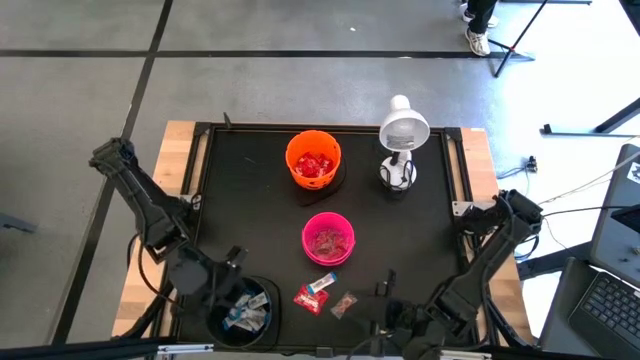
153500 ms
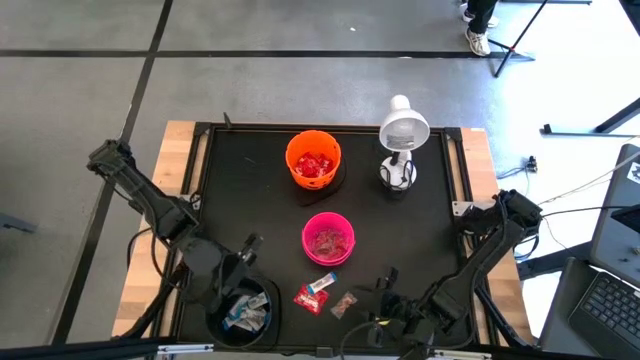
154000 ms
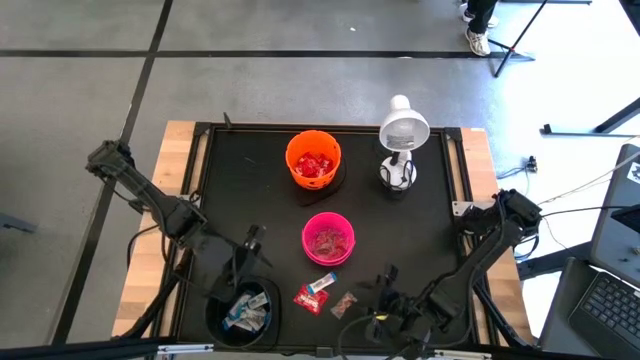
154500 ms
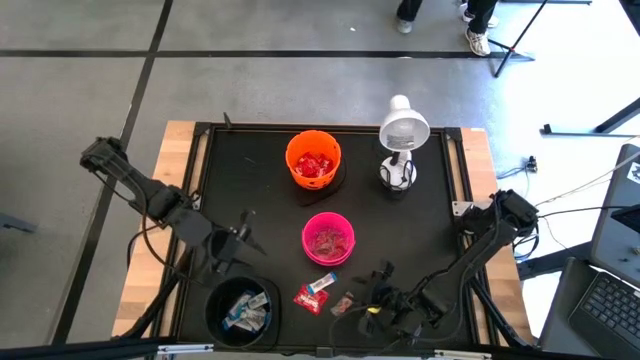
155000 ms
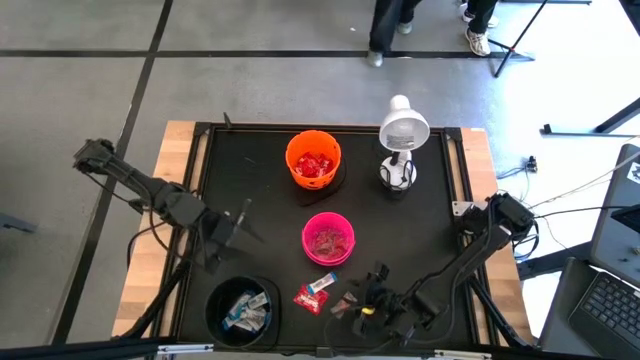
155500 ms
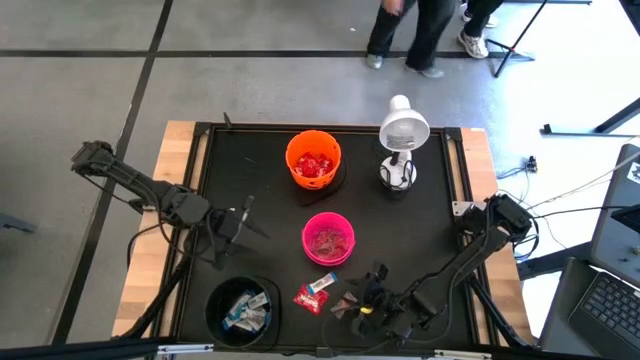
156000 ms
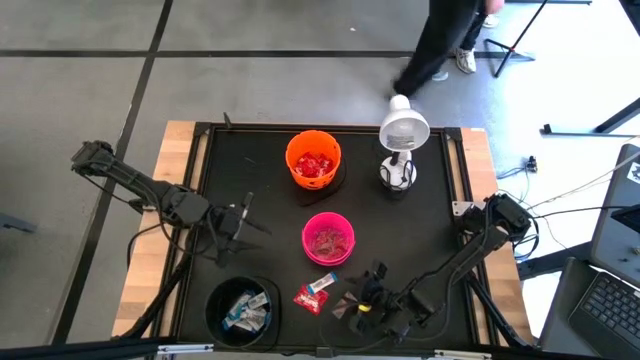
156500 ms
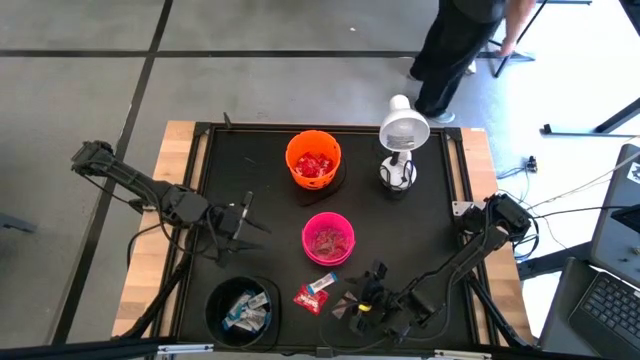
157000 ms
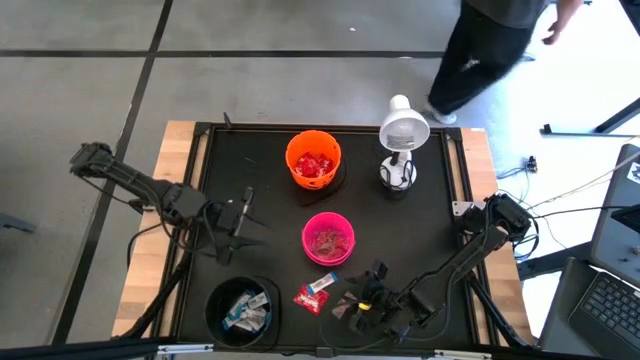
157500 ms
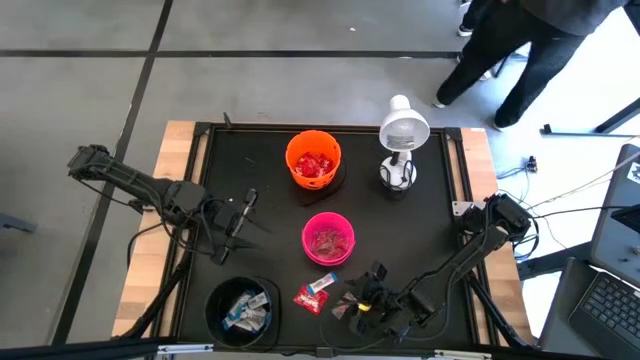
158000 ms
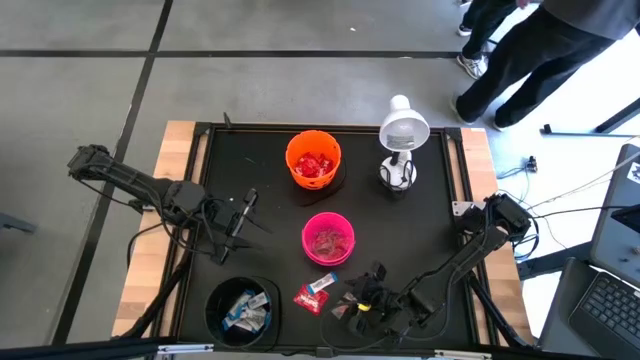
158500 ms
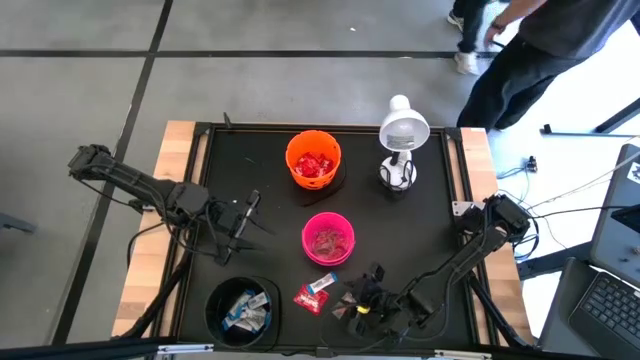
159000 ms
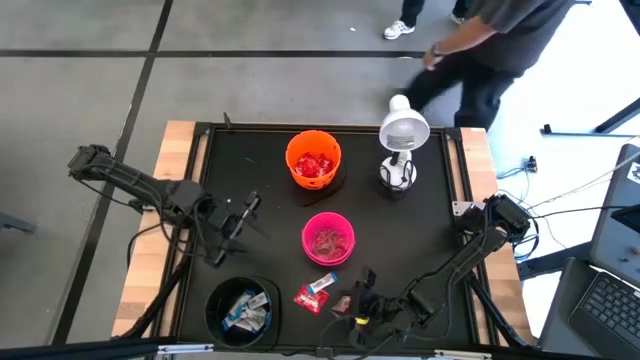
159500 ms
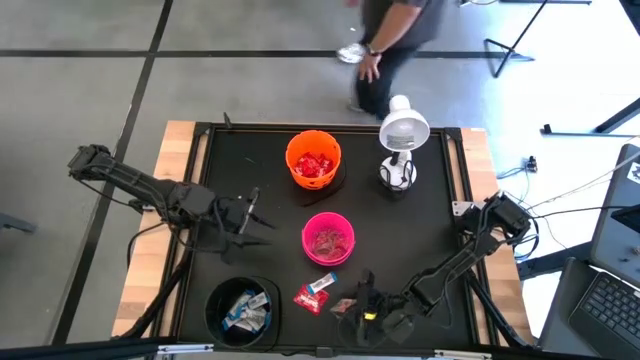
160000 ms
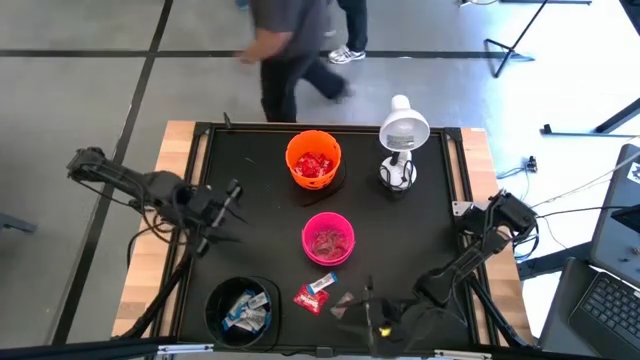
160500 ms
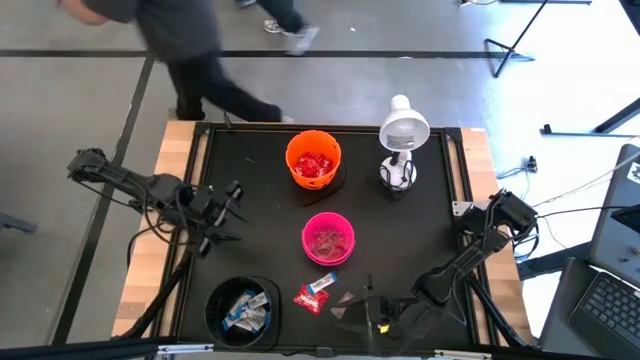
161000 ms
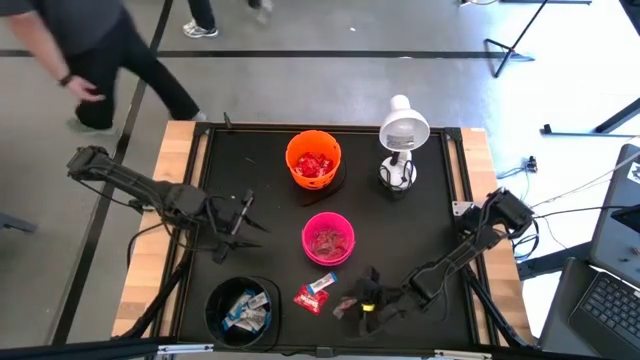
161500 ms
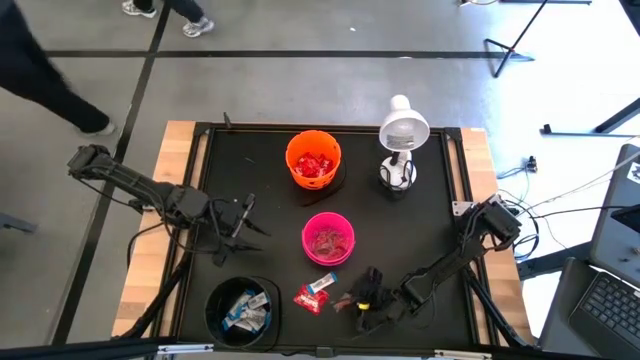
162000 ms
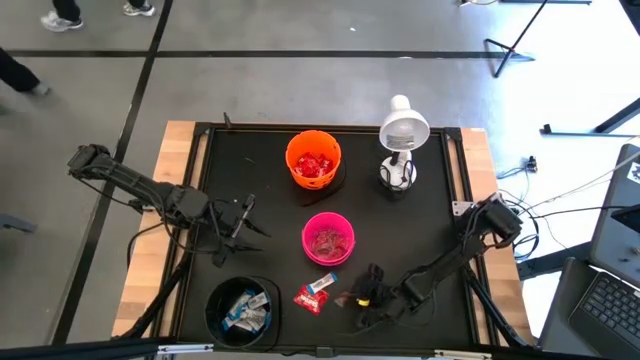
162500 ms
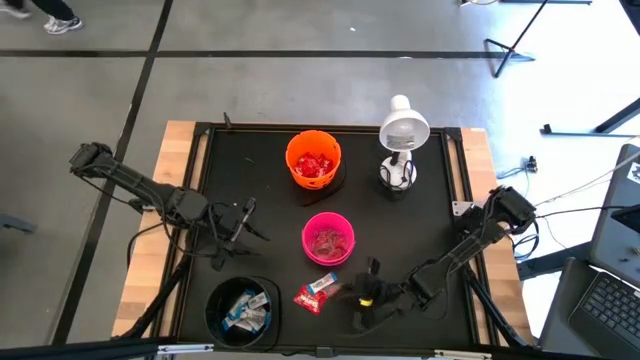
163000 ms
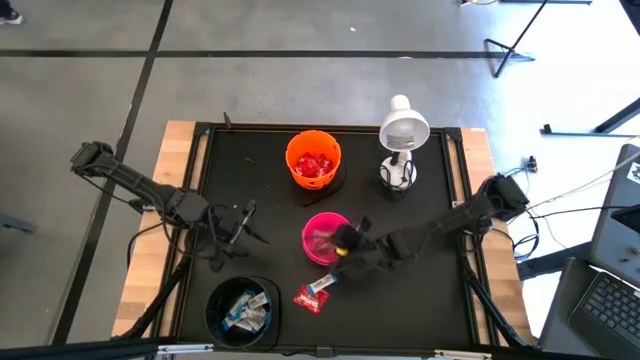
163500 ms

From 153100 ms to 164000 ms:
Task: Sort candy
Put the orange gummy into the pink bucket

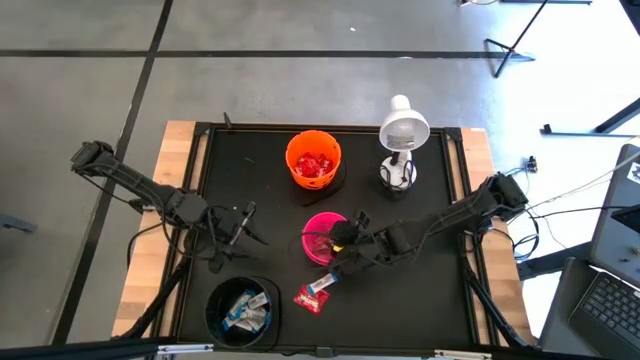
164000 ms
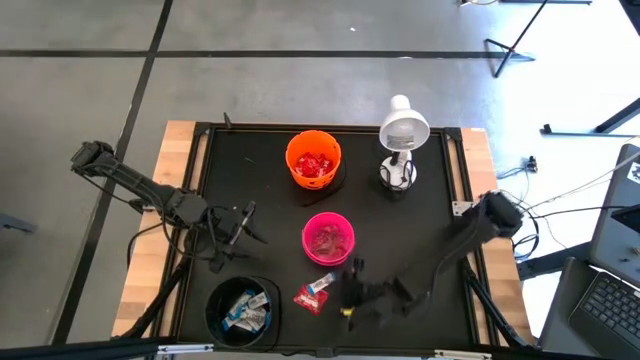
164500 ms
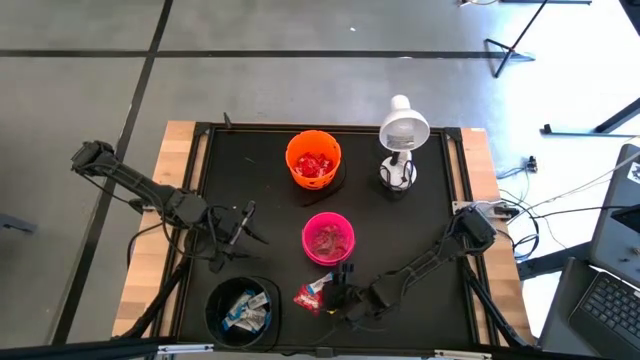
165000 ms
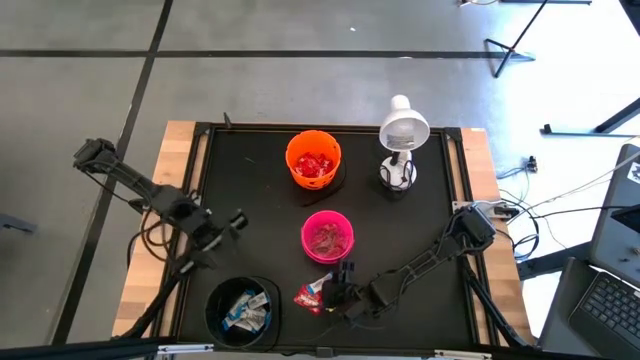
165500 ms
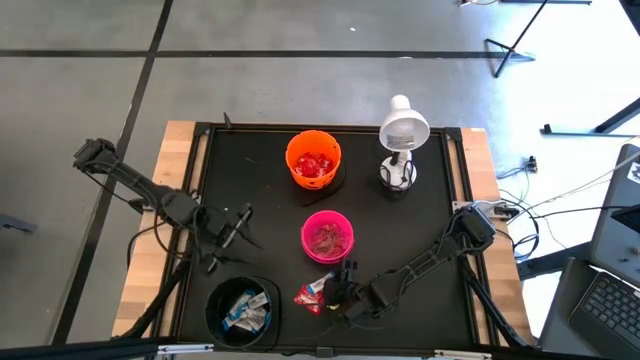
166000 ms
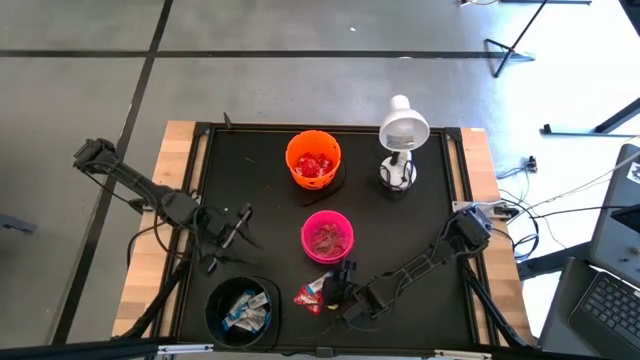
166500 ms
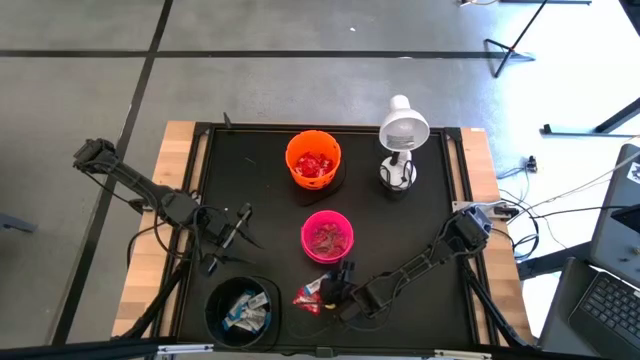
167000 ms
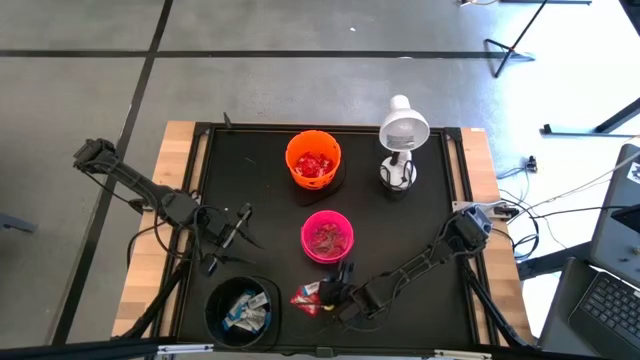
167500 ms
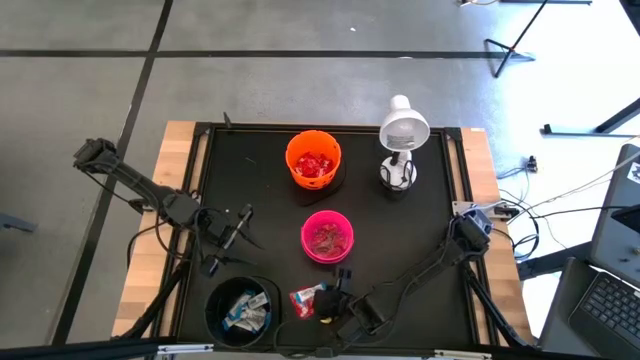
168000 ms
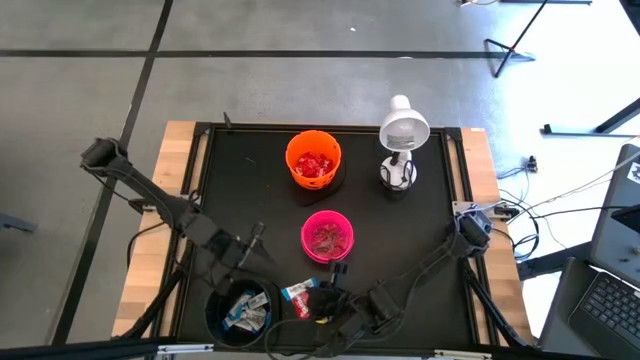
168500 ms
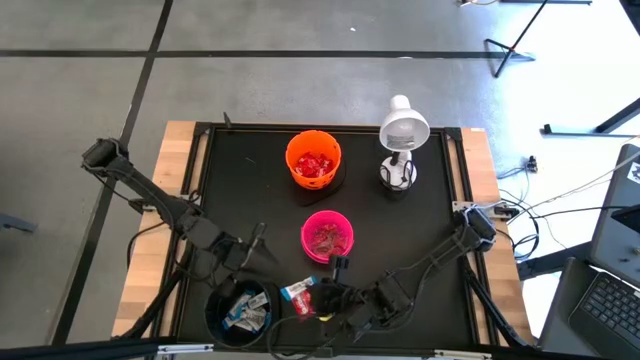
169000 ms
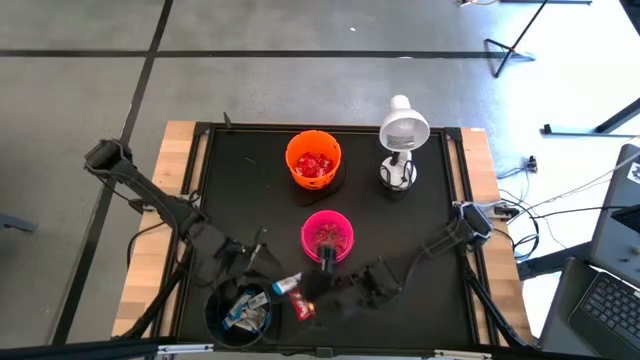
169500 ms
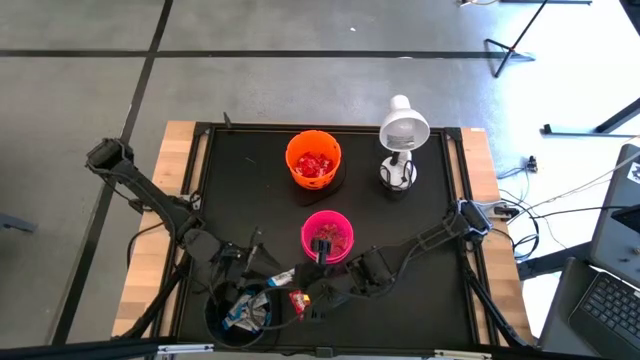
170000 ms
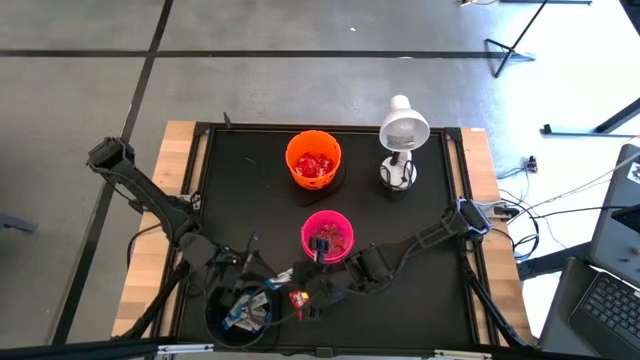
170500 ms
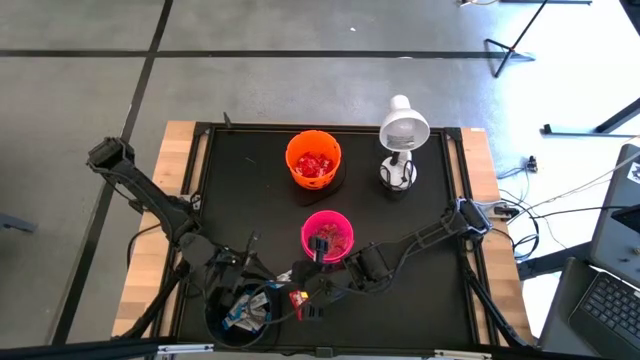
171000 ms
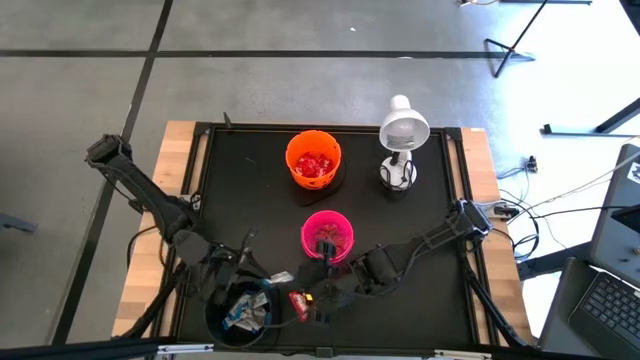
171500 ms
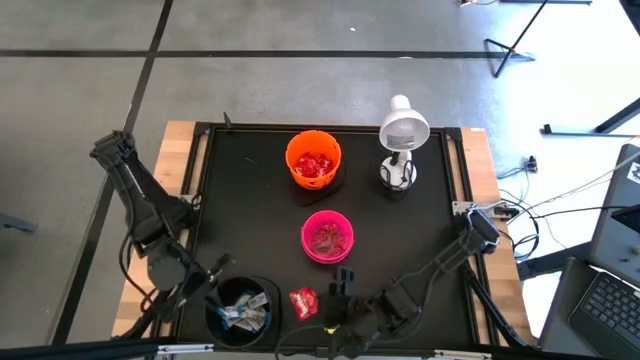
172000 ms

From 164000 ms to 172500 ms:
Put the white chocolate into the black bucket

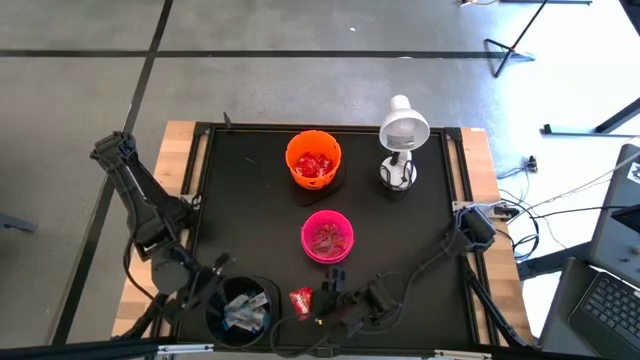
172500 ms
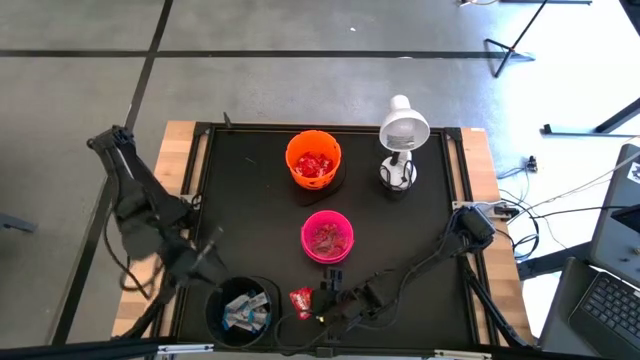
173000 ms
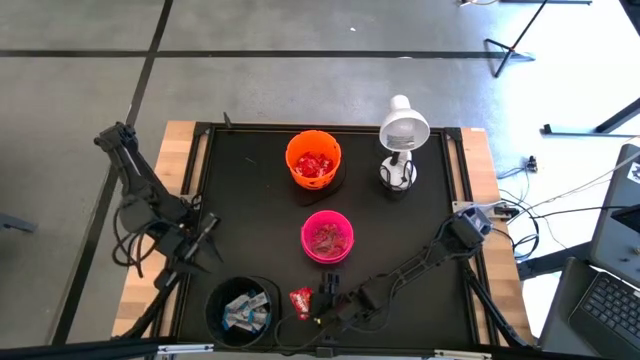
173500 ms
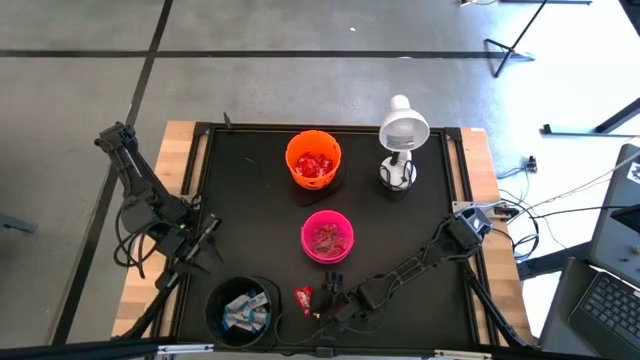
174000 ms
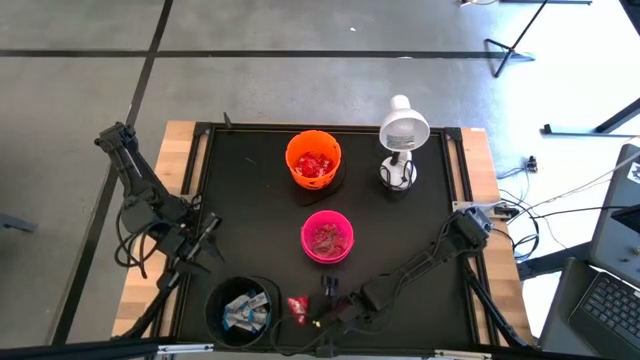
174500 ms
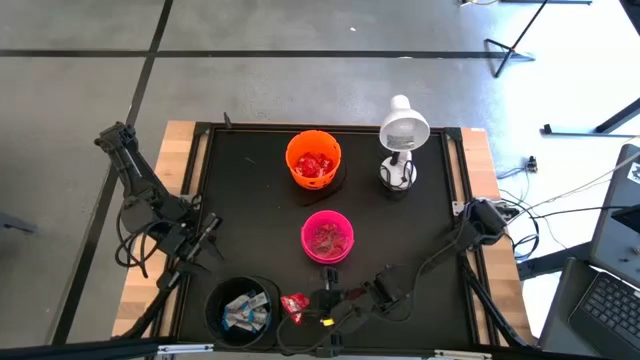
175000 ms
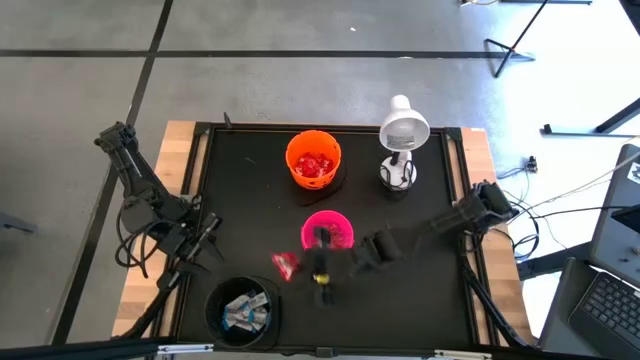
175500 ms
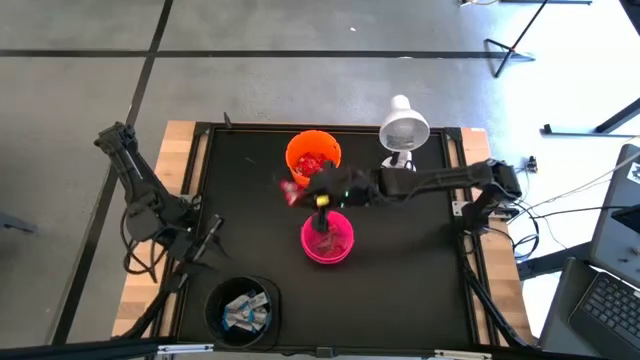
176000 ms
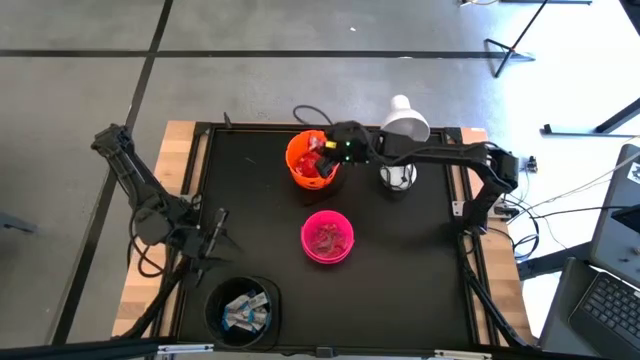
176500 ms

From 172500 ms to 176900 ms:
Put the red candy into the orange bucket
